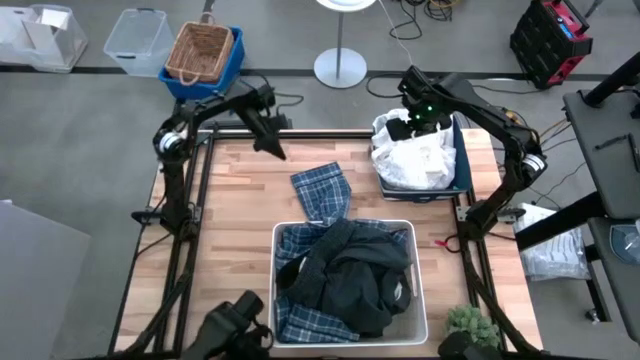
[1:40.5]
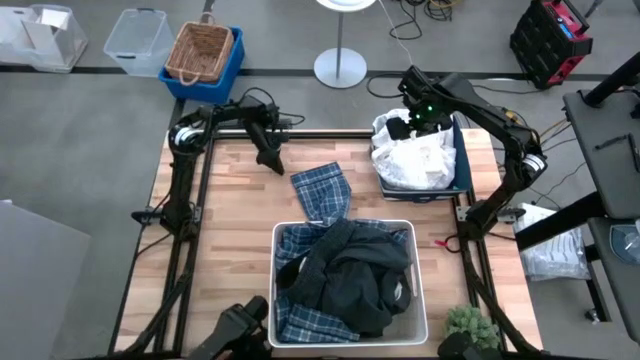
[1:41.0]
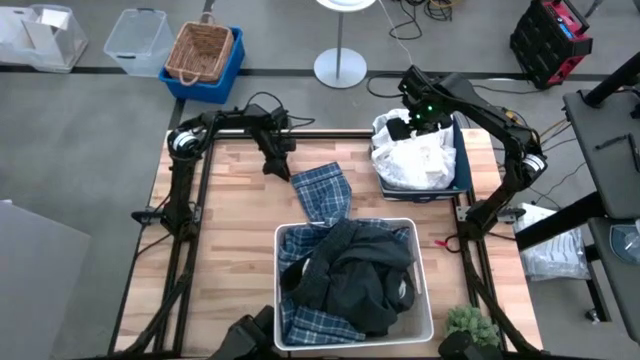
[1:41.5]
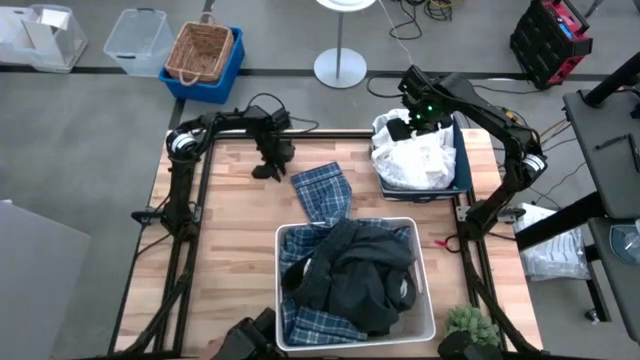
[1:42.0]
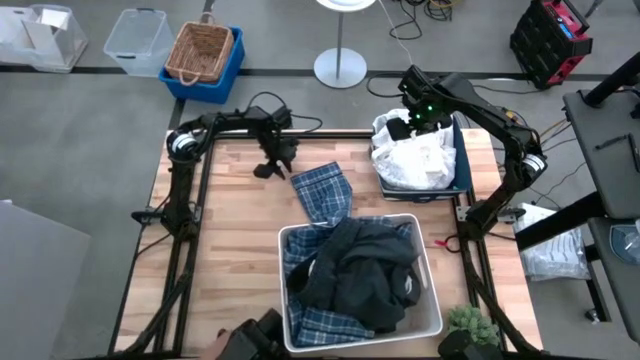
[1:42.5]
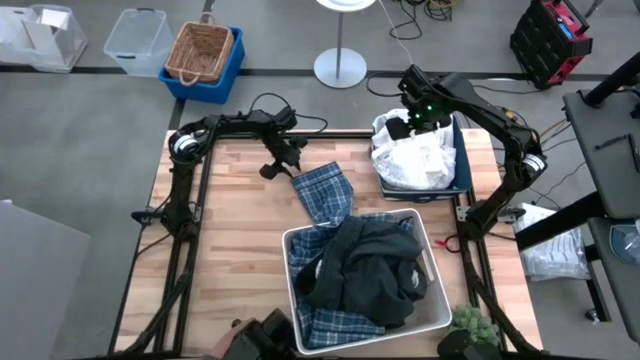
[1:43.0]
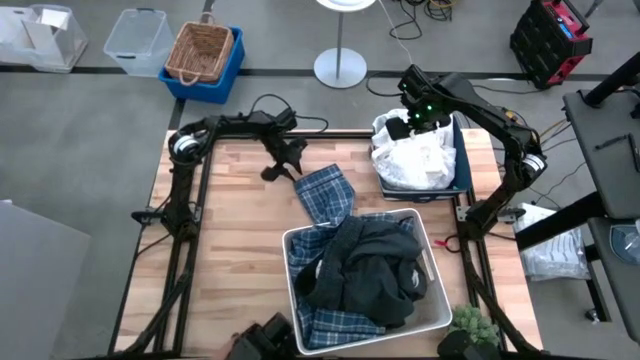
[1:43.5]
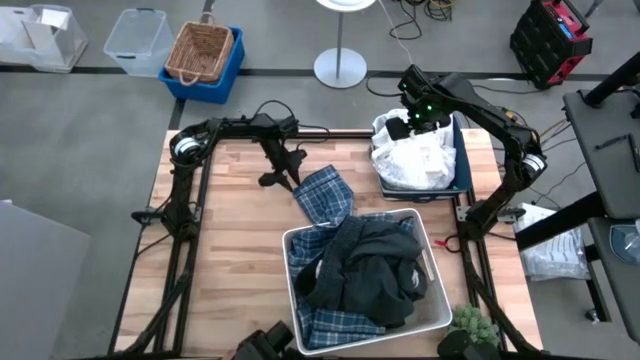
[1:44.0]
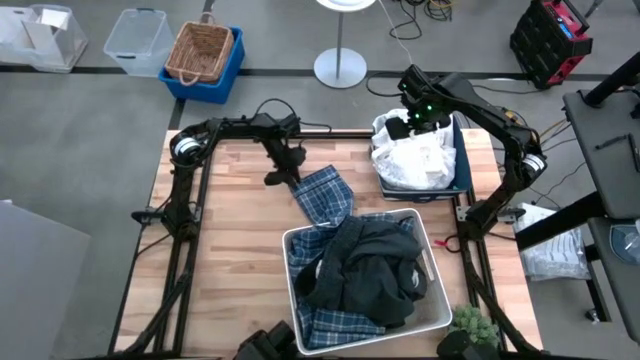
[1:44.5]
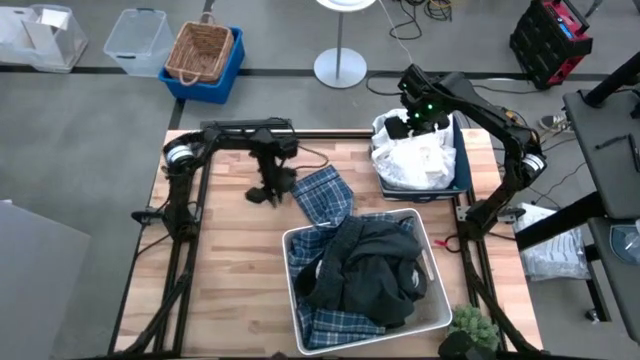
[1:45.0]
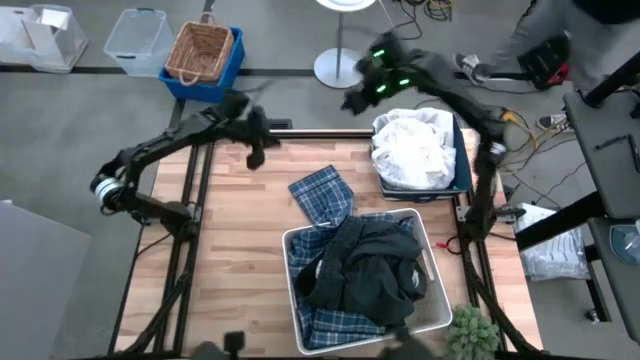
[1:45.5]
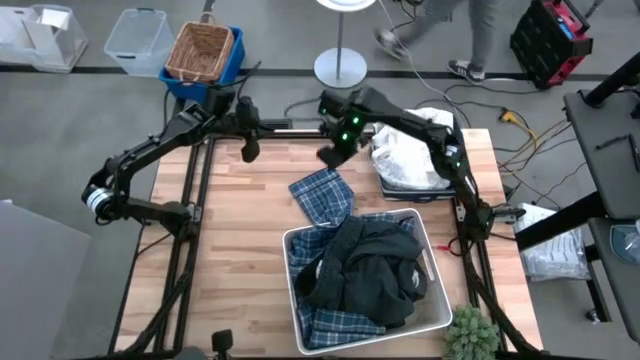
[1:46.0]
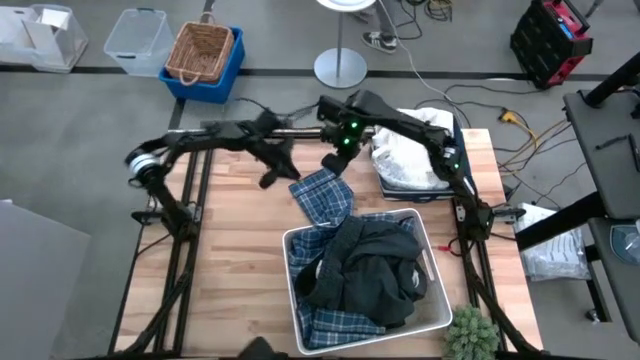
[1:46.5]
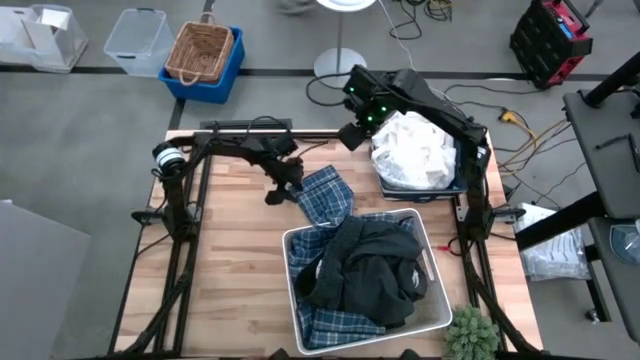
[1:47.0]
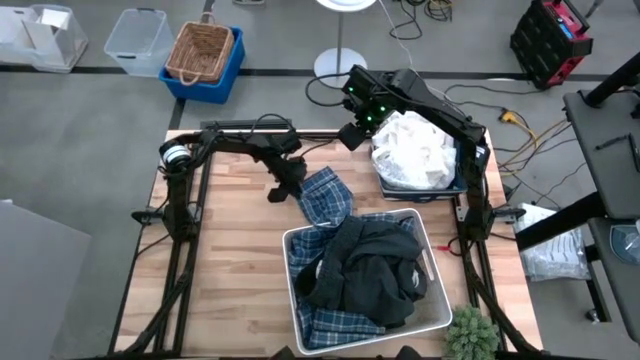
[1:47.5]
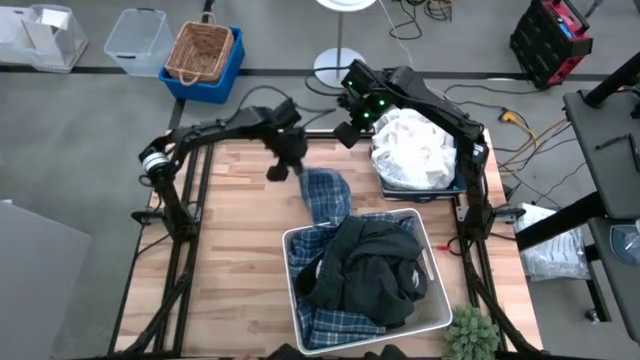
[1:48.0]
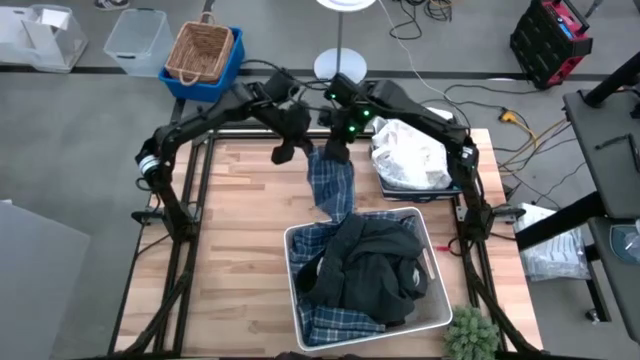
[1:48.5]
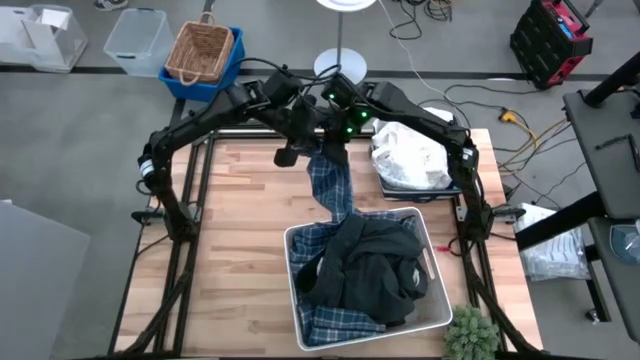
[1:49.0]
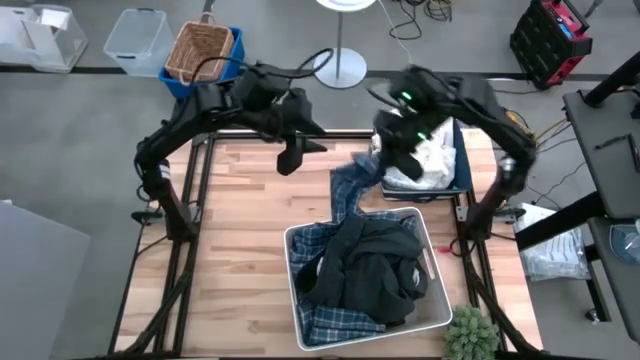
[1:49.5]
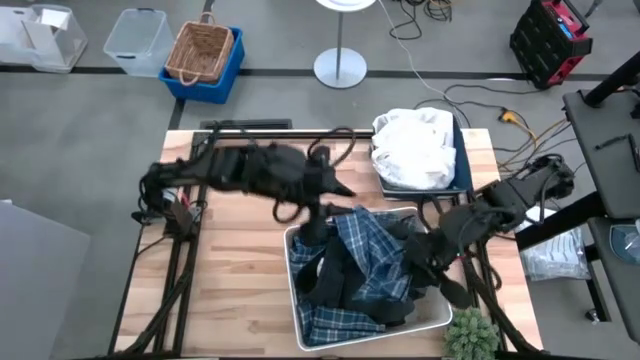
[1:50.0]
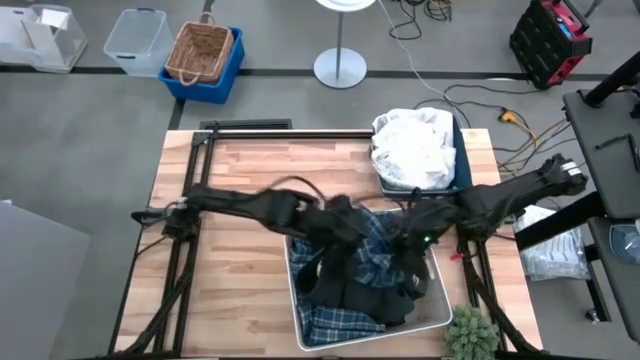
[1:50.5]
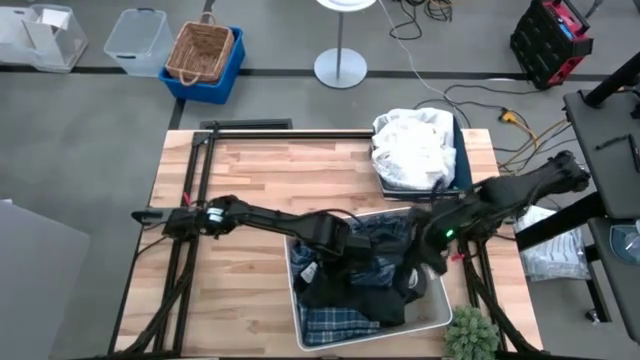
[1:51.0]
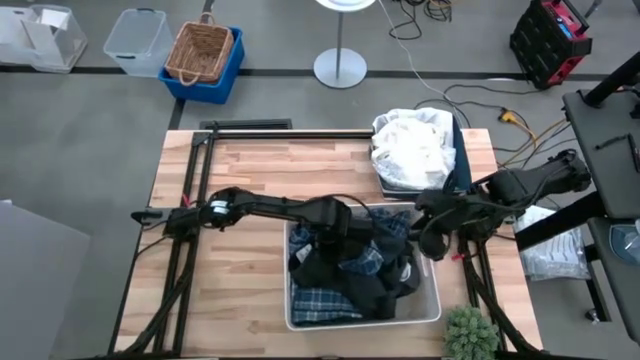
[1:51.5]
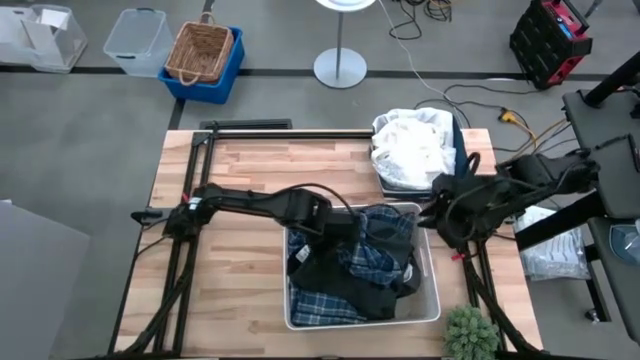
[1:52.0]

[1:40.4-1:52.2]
Task: Sort clothes
Adjust the blue long sleeve shirt in the white bin

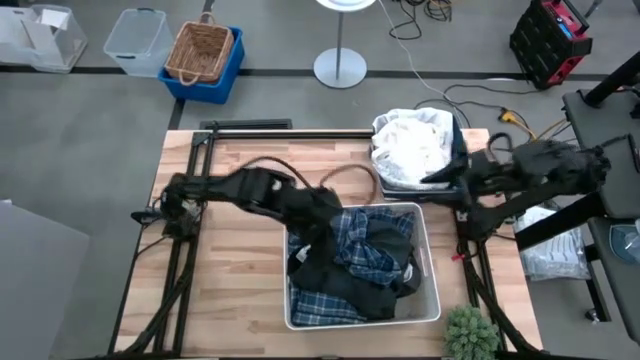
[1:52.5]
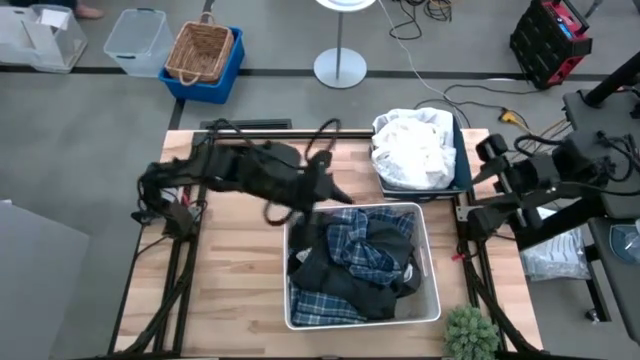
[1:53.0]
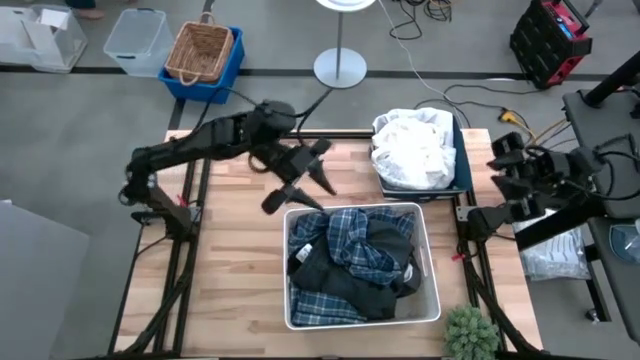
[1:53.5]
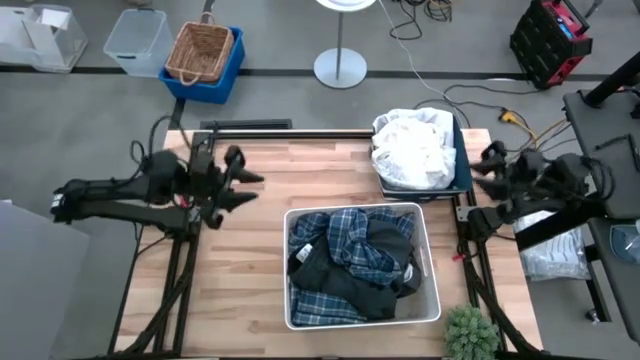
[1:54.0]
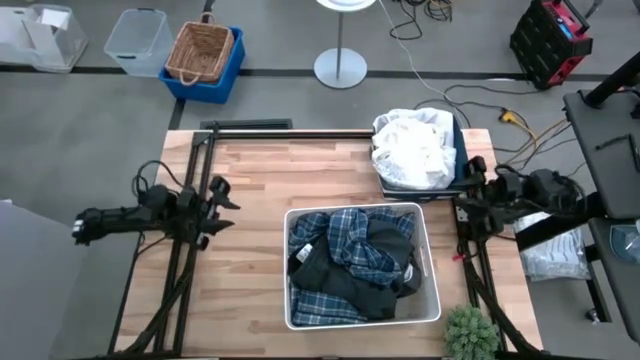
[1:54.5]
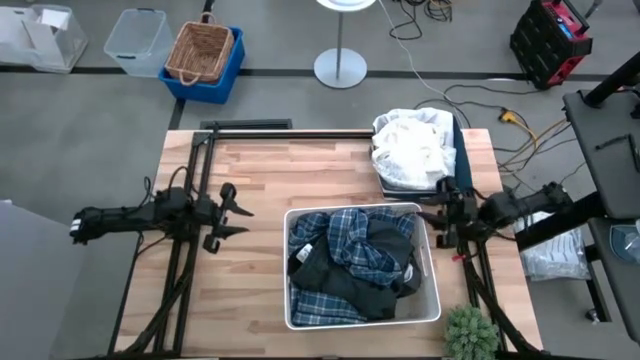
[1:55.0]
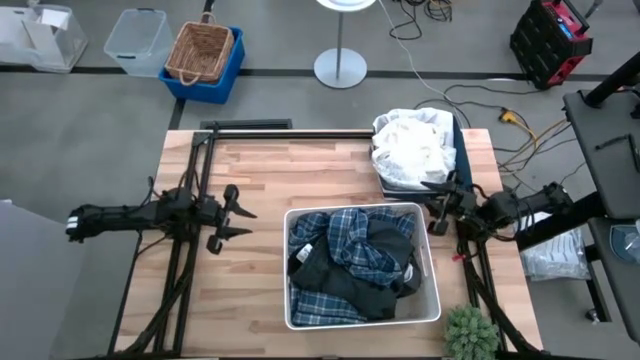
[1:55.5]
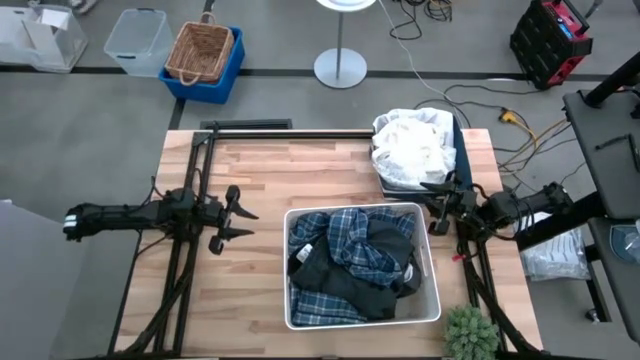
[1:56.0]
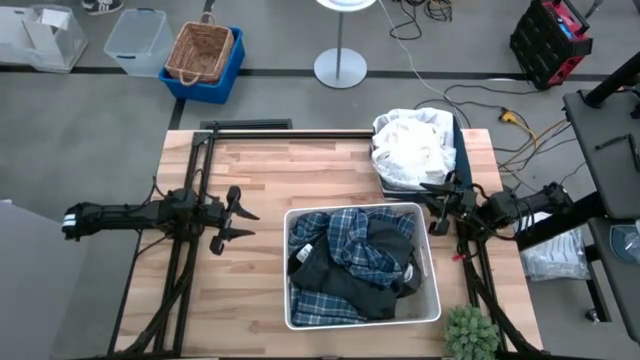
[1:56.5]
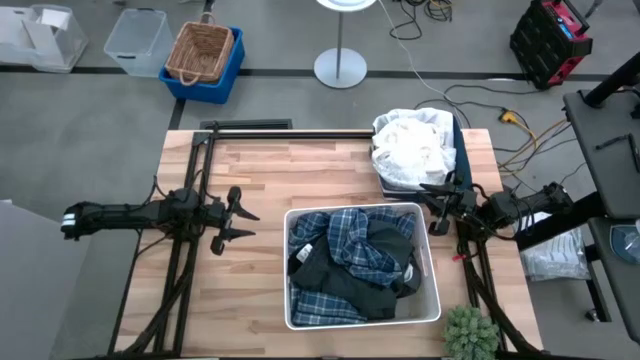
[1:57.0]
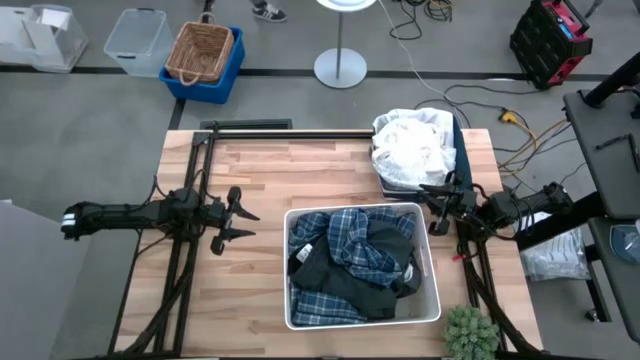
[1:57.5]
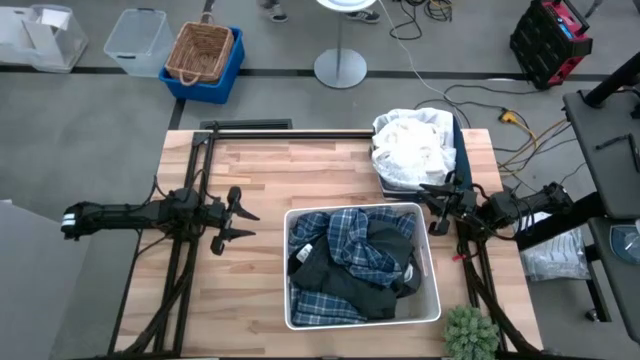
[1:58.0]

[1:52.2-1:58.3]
Return to Home Position
